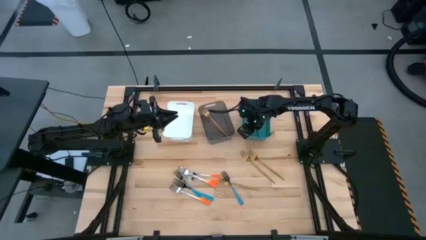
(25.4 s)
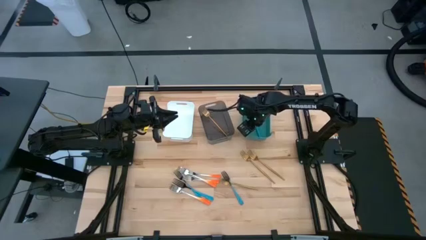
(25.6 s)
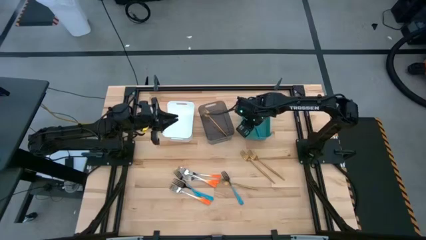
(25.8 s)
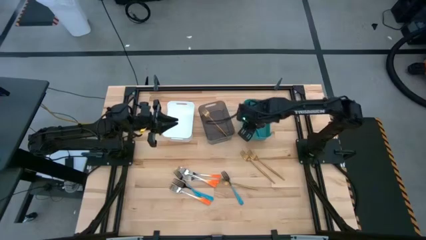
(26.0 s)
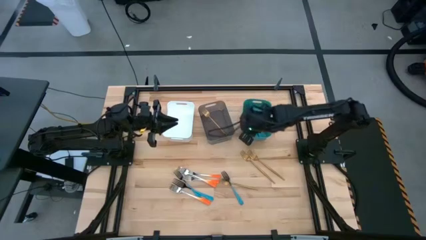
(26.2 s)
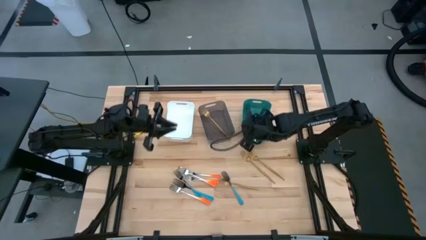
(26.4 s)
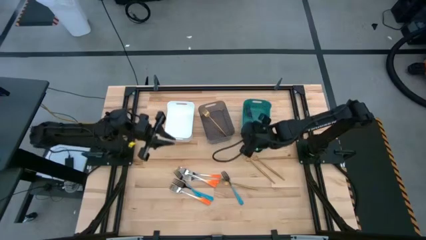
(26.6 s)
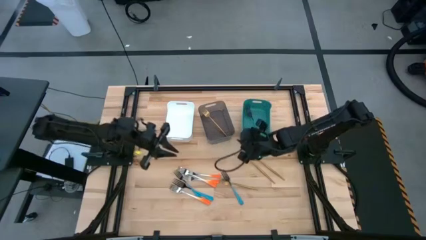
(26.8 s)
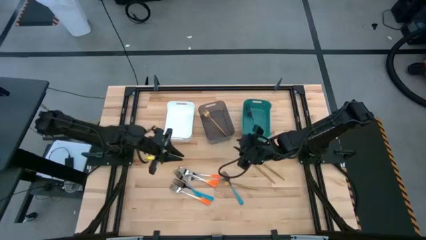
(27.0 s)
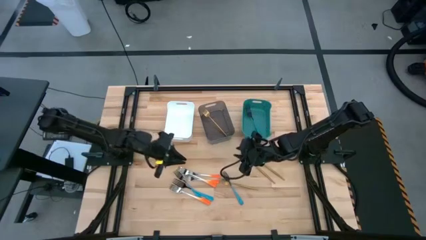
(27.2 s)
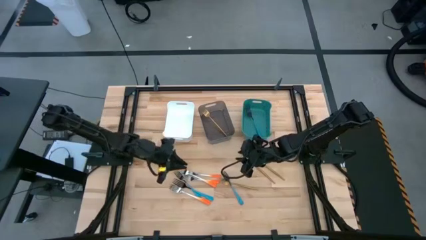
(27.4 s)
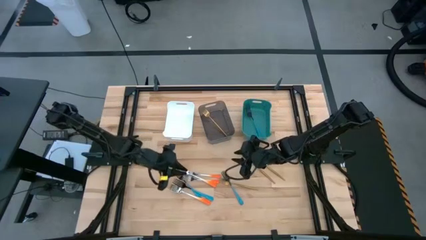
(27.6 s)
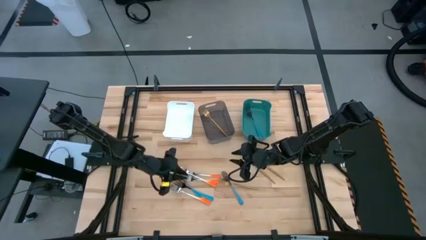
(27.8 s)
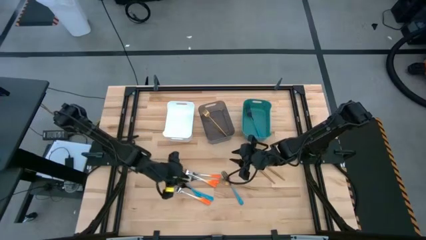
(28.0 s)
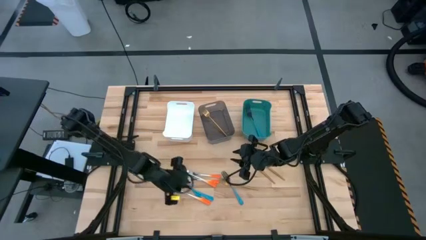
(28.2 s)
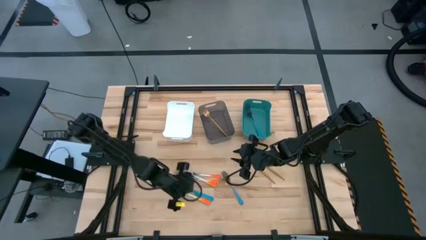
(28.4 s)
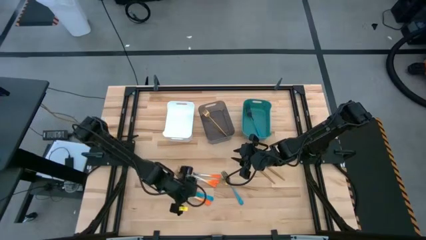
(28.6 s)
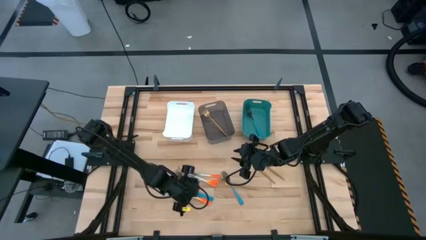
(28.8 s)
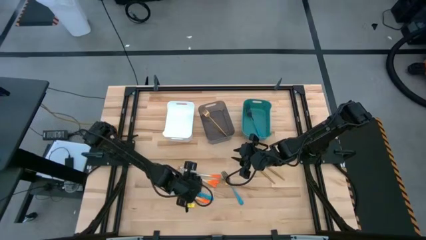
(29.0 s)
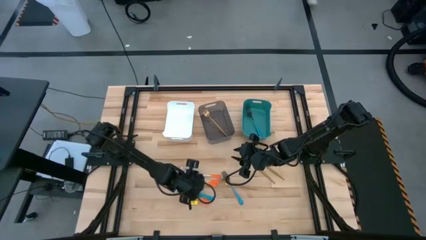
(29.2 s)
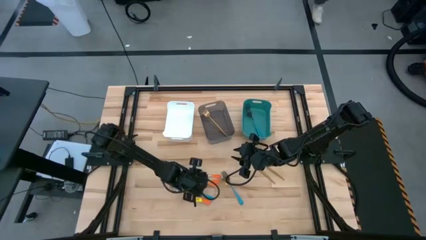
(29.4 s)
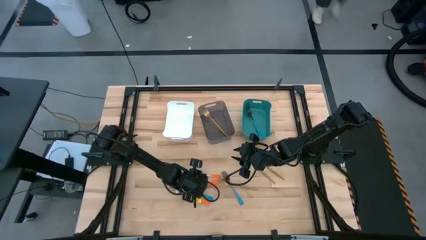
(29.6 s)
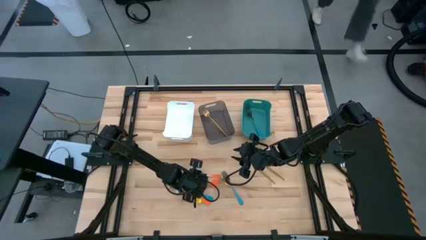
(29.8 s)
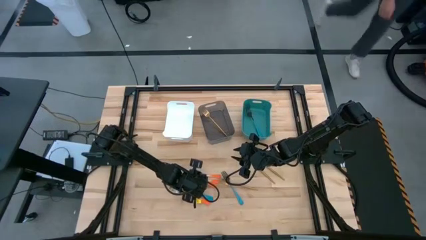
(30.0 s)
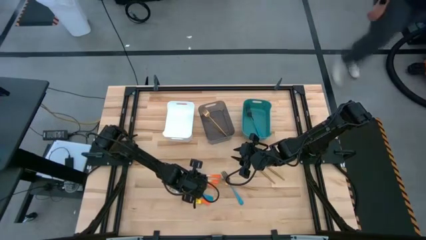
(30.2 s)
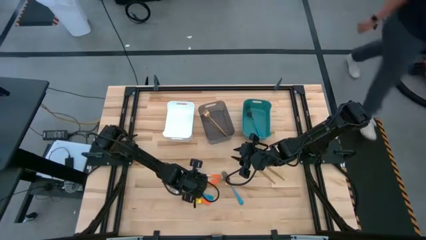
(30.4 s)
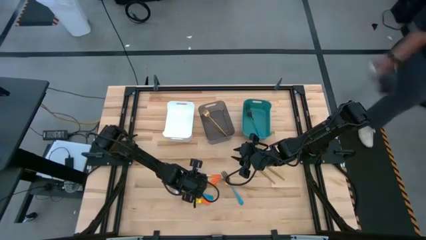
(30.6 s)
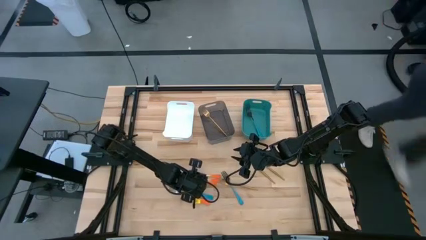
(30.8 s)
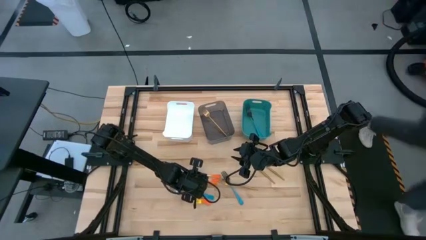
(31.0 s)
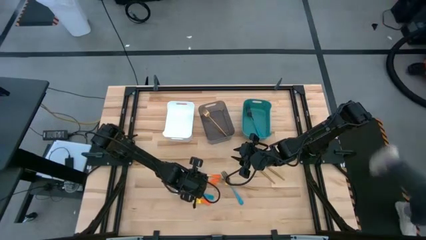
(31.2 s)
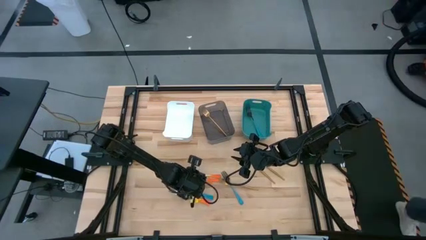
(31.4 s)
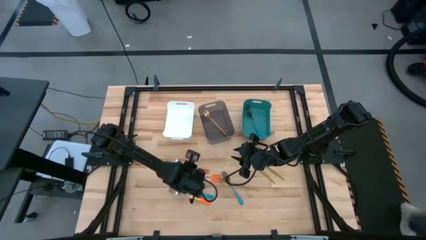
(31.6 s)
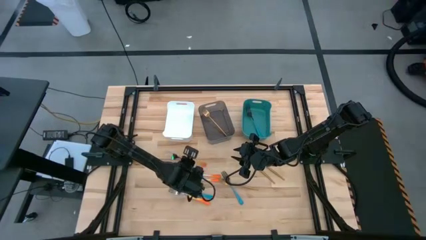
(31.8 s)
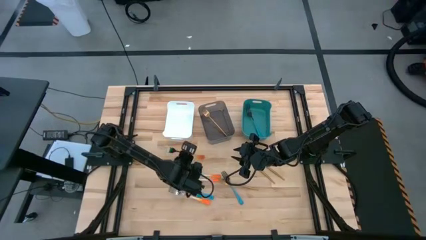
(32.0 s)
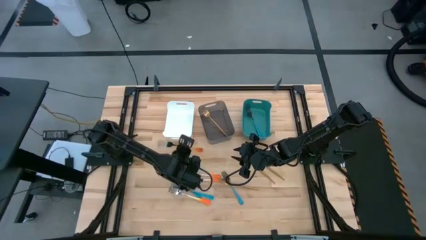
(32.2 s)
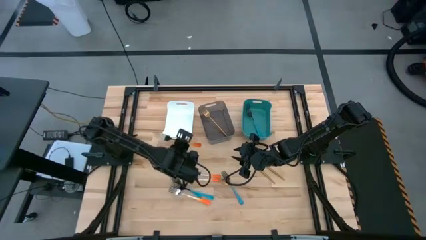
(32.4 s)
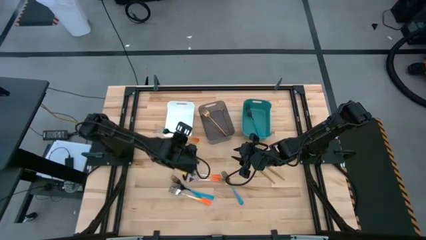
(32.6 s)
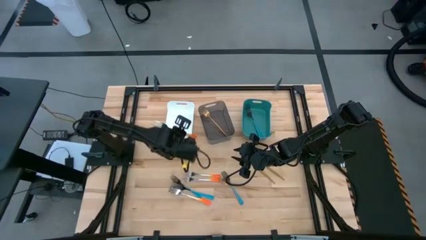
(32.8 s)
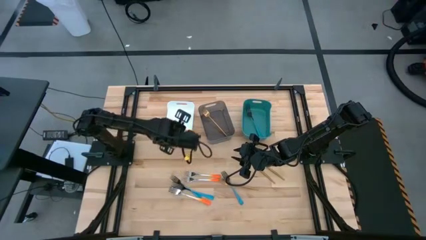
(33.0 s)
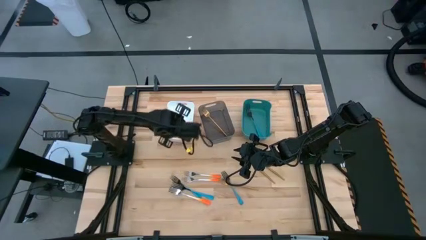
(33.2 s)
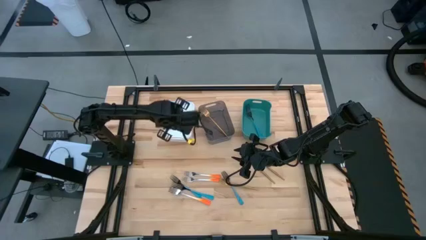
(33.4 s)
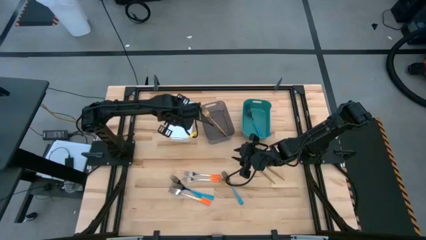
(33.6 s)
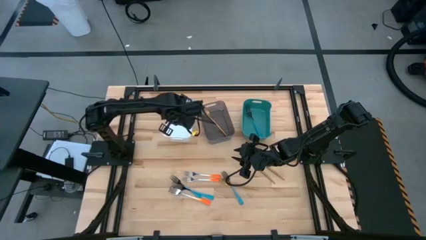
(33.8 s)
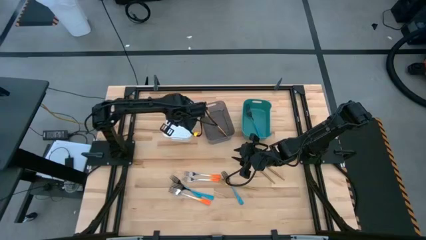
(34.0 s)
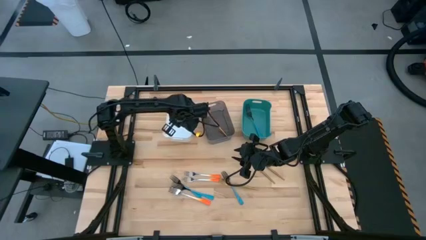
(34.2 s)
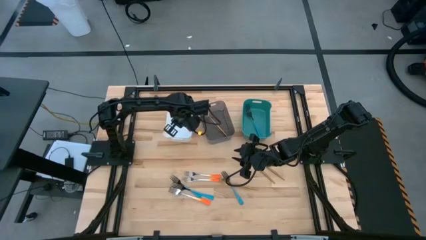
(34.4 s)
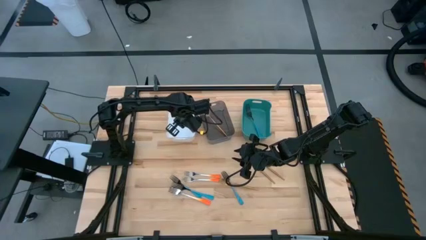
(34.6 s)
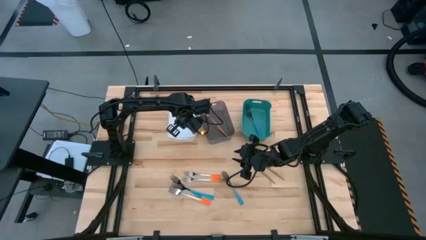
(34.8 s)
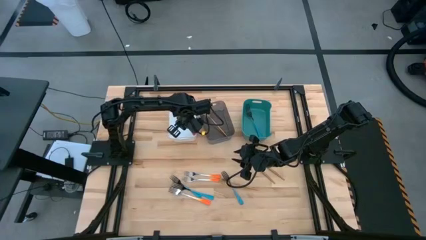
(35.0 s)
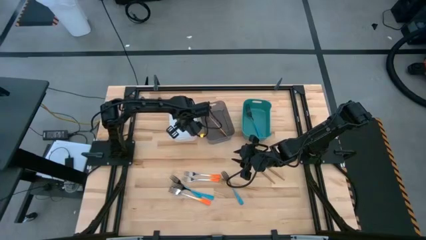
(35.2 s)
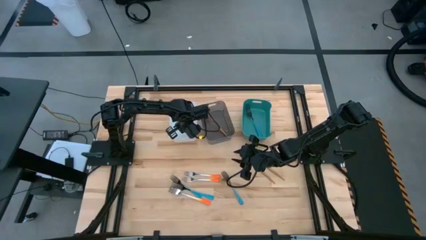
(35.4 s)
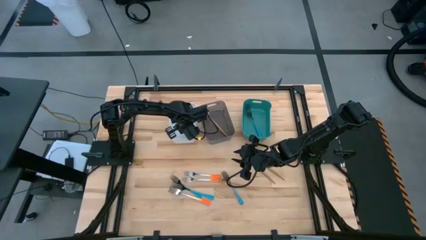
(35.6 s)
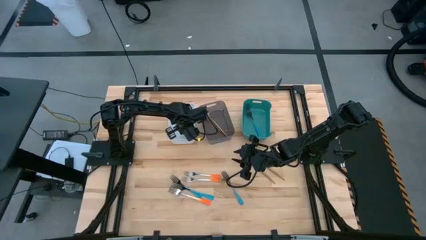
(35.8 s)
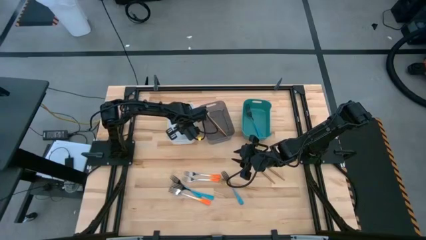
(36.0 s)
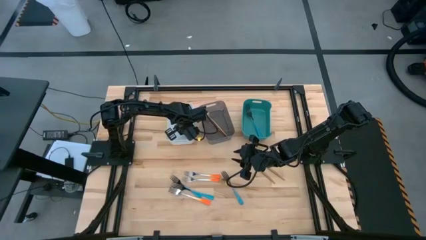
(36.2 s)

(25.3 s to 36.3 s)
Task: Sort silverware by color (type)
Put the orange fork into the white bin
